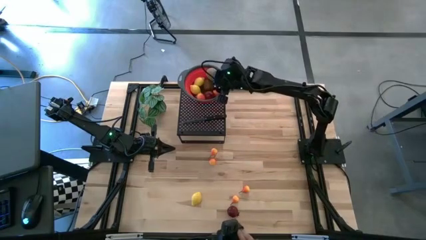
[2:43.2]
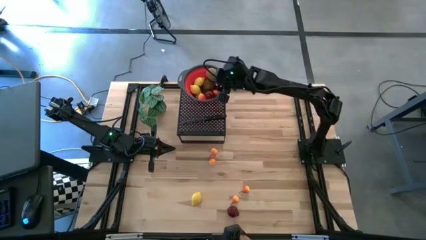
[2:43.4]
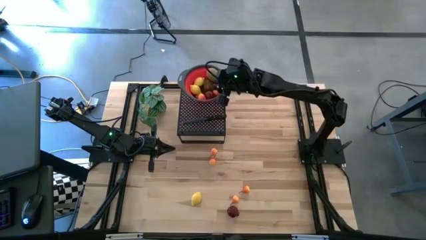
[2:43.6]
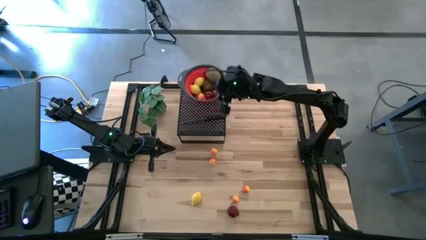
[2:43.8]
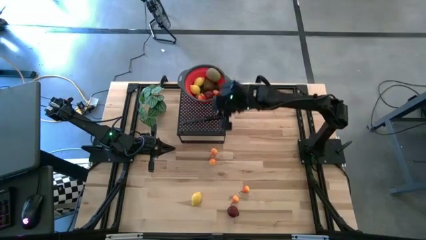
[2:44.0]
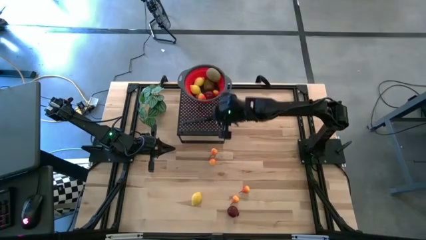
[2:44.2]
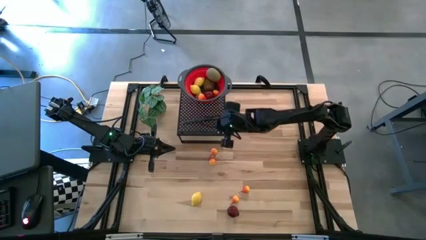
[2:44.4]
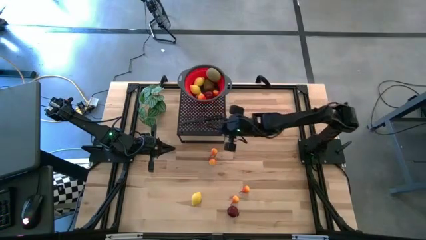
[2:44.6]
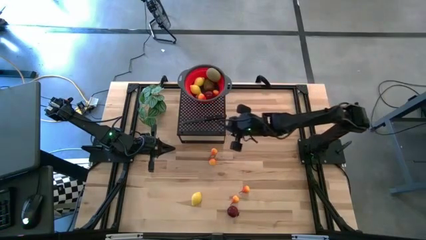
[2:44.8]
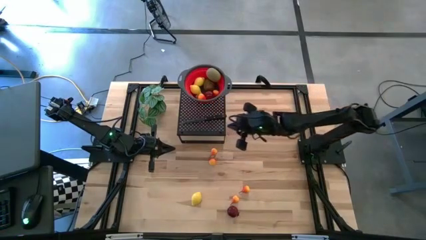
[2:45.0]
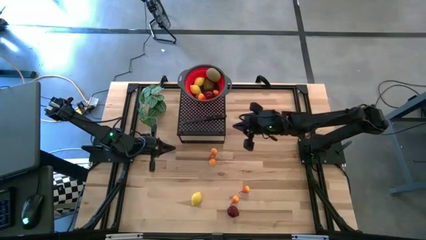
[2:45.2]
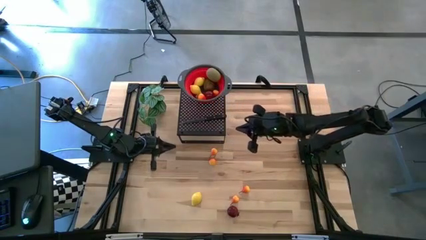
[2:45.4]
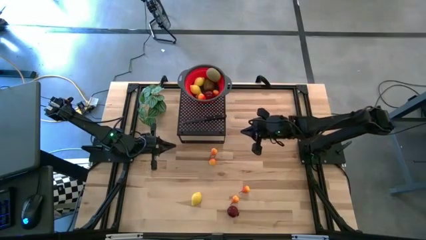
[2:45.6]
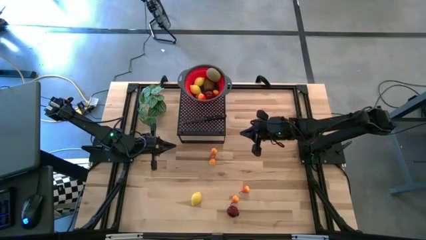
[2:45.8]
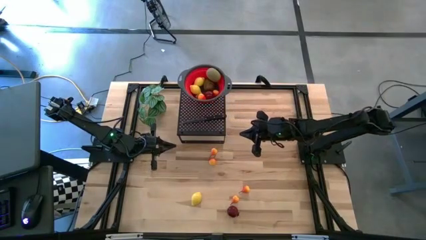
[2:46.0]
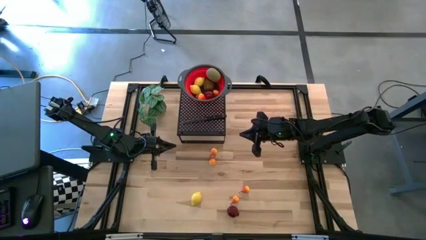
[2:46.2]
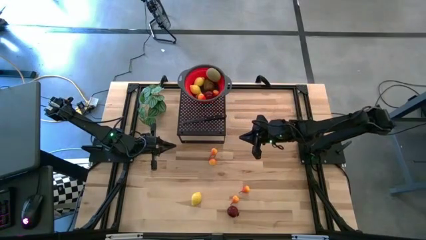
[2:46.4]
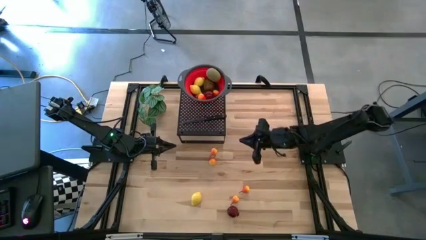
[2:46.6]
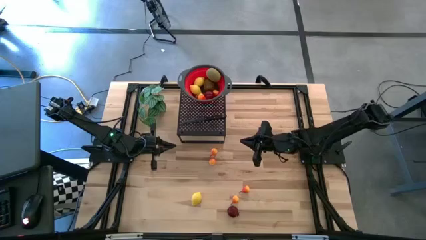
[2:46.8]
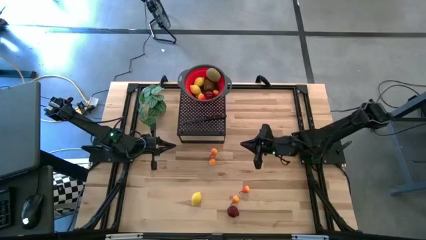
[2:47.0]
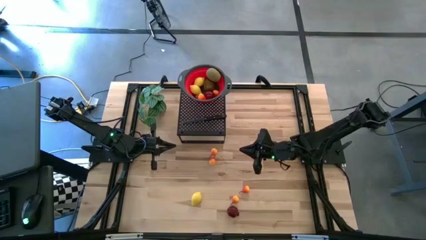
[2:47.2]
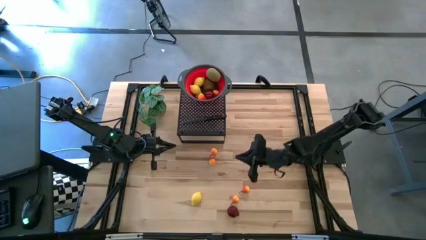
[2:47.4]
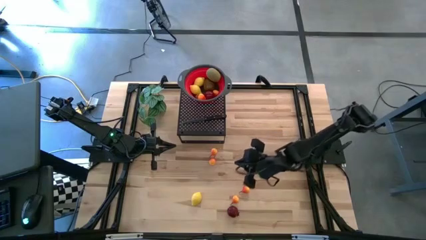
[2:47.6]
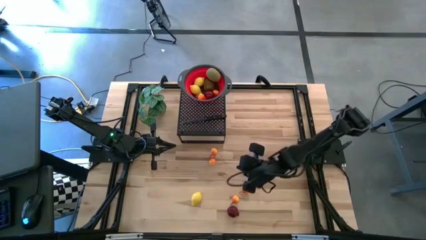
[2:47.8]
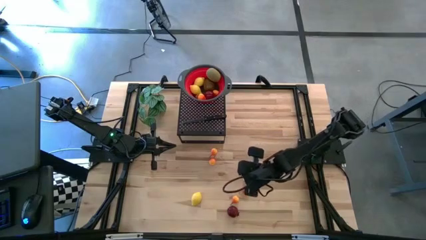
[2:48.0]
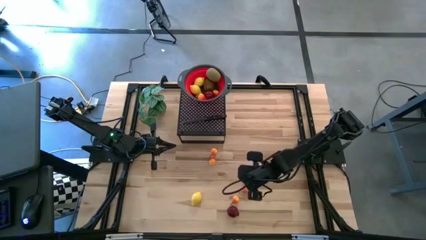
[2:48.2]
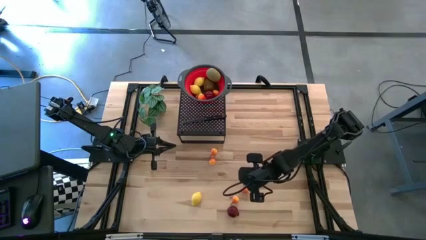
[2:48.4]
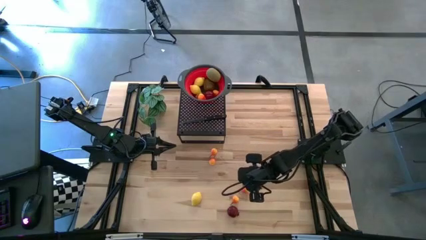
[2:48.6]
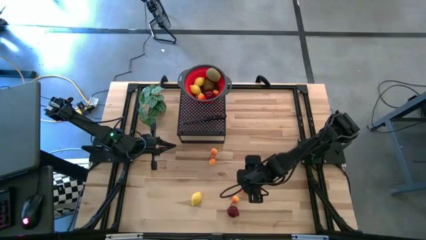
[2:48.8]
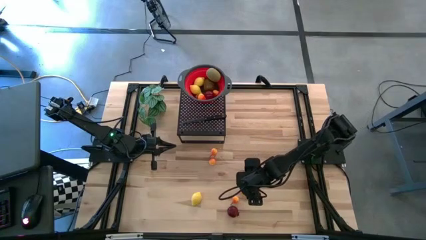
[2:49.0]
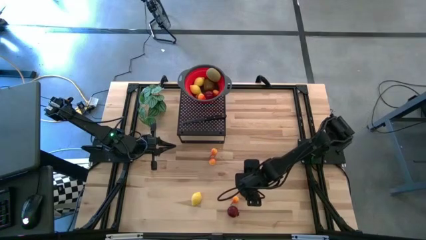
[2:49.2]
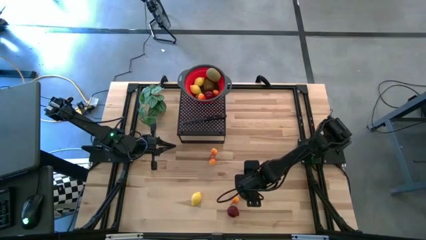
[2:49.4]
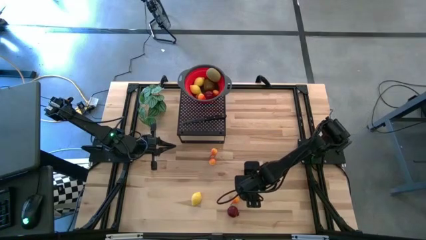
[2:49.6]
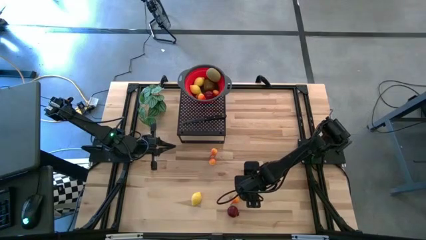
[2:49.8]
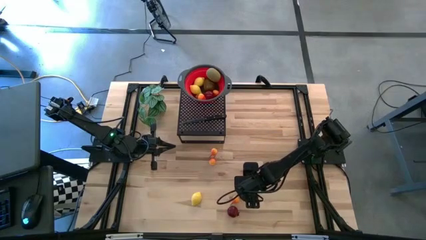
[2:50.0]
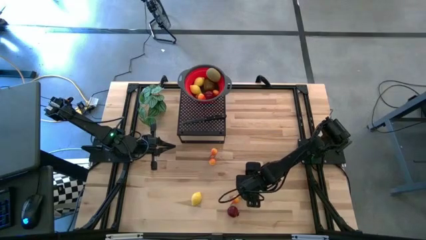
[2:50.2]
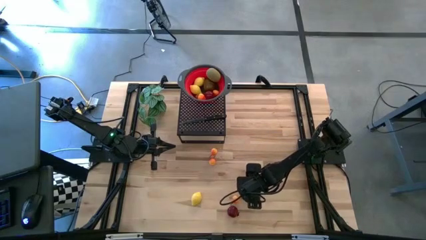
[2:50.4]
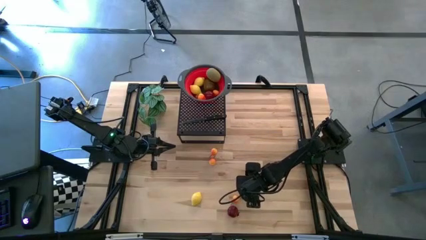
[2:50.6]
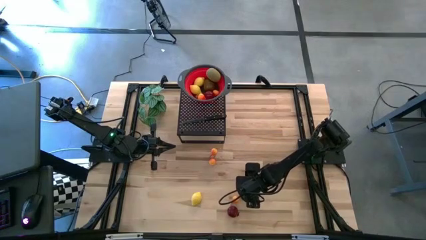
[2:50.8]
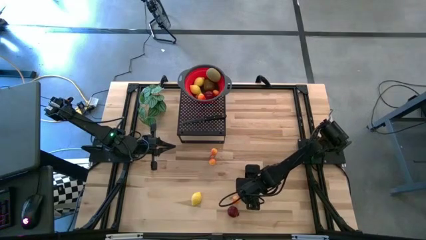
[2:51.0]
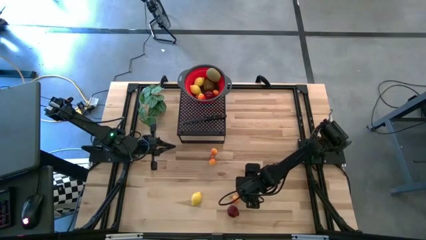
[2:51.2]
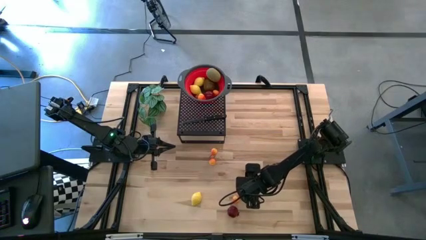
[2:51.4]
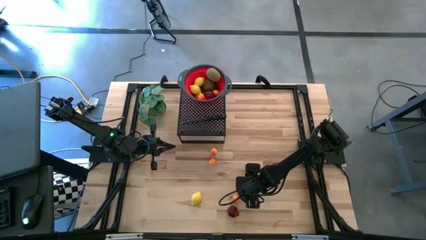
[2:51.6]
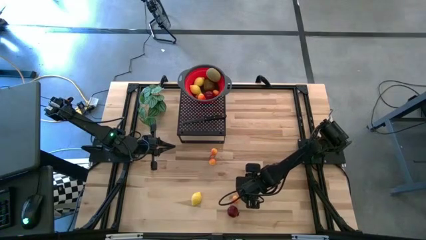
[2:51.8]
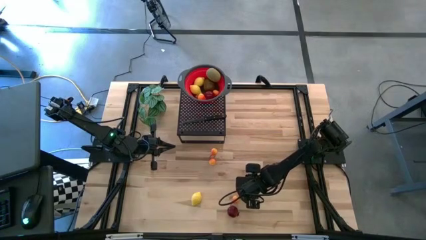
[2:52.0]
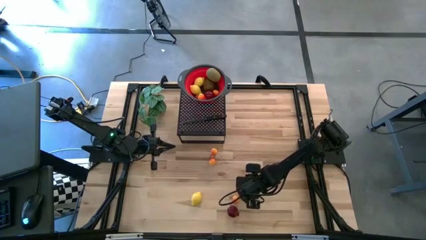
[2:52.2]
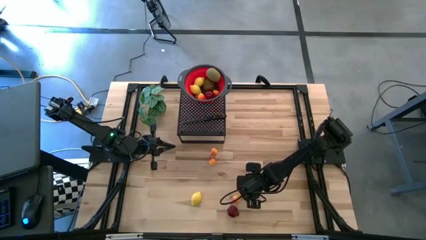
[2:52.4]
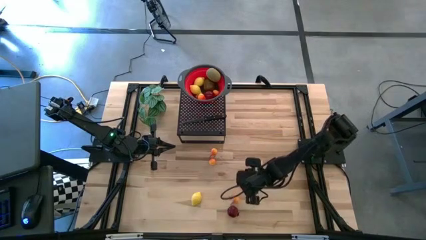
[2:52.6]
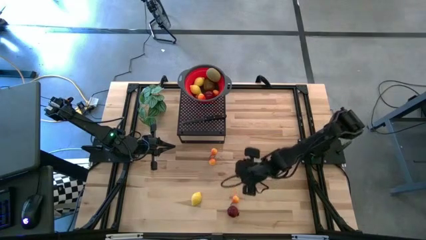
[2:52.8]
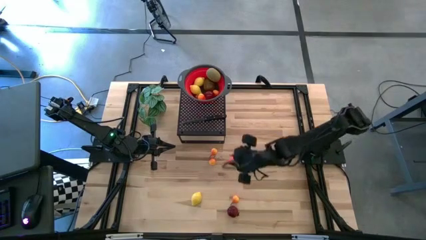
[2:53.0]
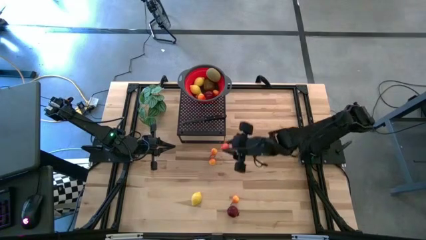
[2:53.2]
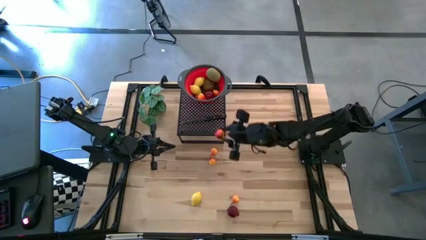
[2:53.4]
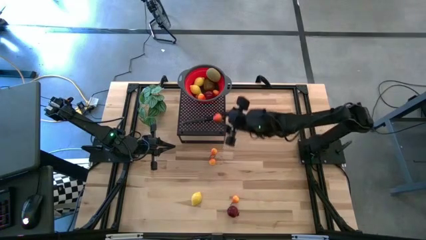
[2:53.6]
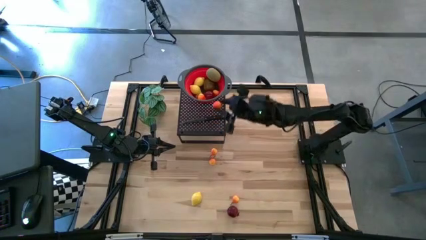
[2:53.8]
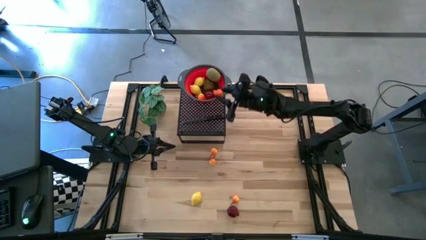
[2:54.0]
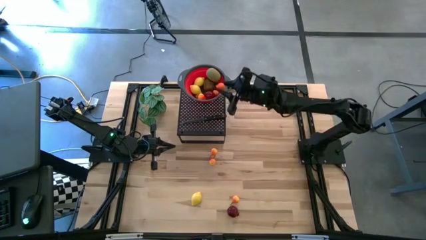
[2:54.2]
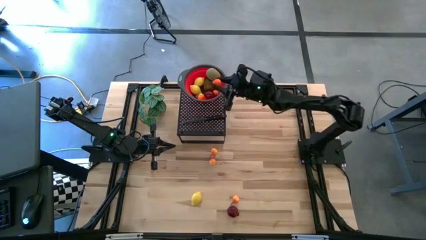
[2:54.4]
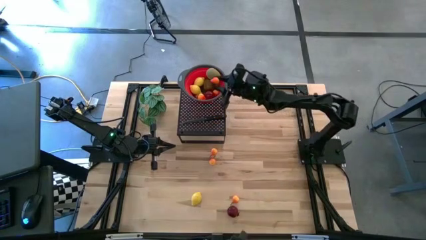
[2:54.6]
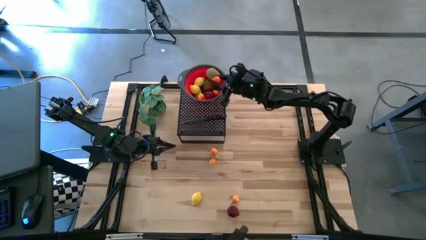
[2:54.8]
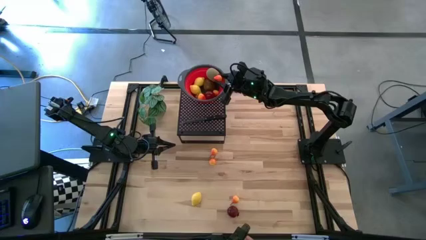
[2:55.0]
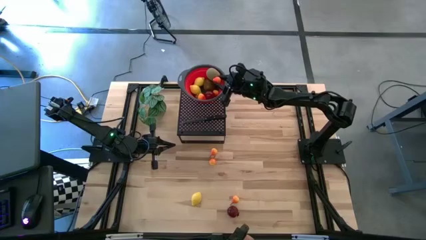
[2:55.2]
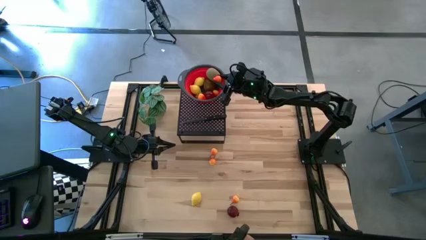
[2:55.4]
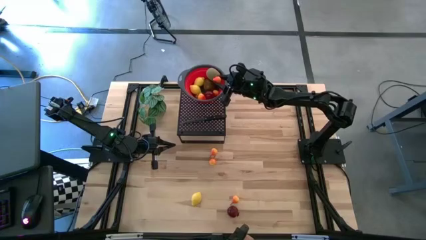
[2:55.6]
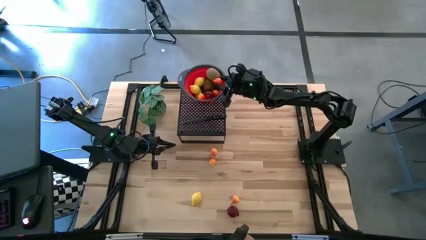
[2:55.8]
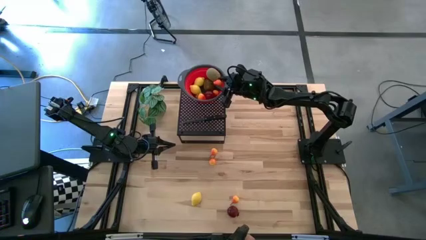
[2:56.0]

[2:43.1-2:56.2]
Task: Pick & Place Fruit
Put the pear into the red strainer bowl

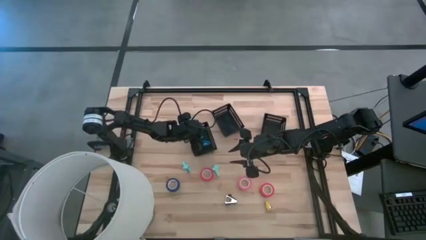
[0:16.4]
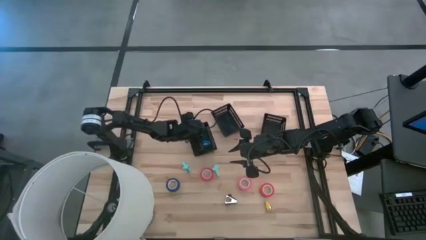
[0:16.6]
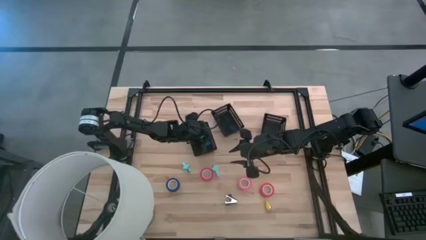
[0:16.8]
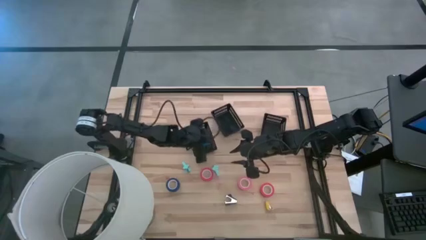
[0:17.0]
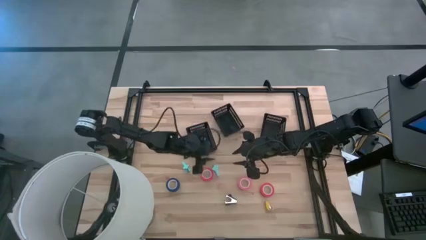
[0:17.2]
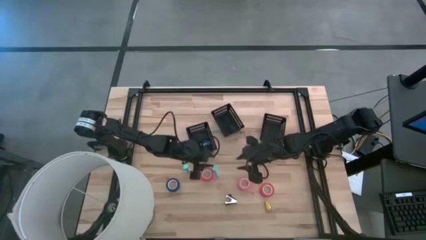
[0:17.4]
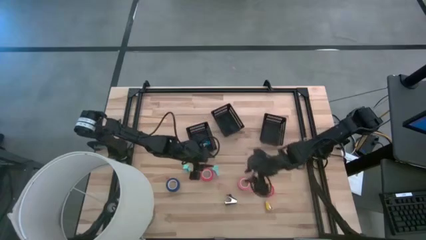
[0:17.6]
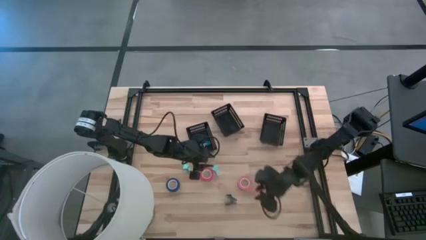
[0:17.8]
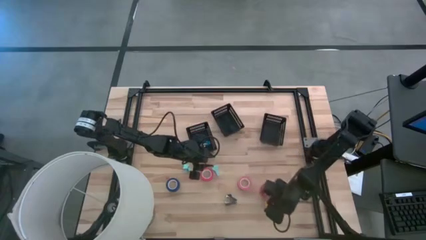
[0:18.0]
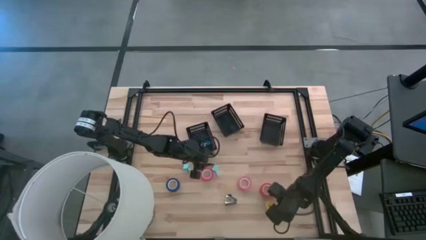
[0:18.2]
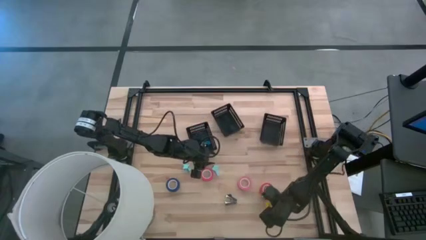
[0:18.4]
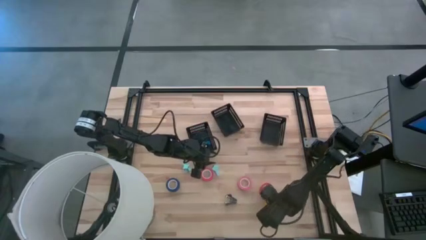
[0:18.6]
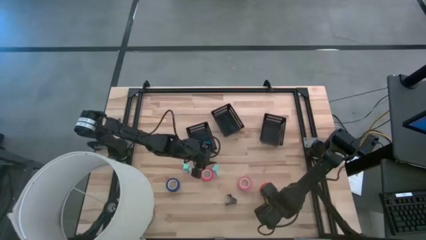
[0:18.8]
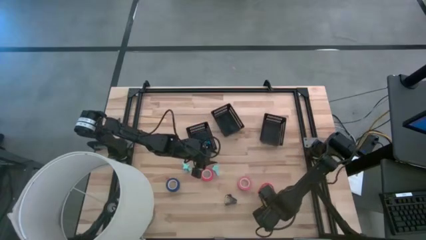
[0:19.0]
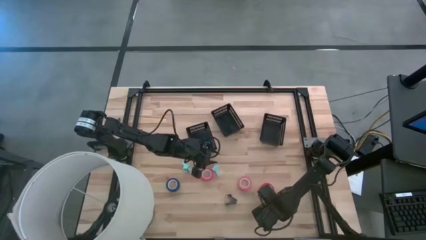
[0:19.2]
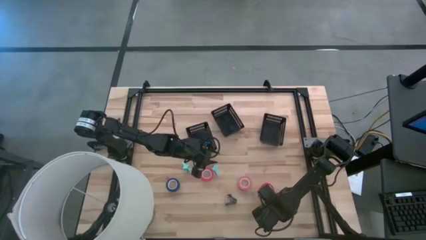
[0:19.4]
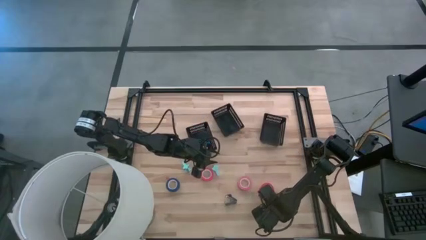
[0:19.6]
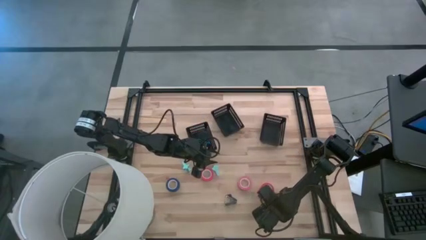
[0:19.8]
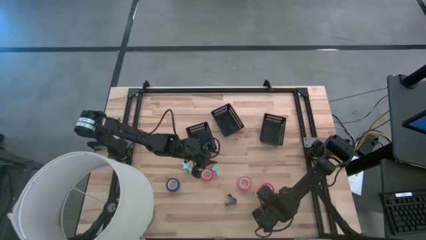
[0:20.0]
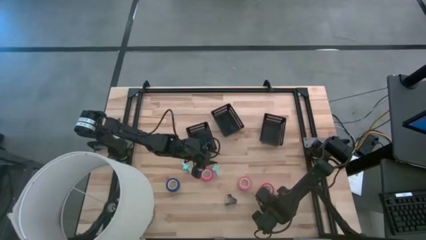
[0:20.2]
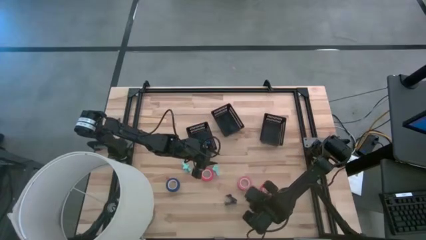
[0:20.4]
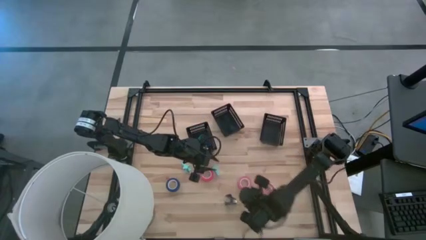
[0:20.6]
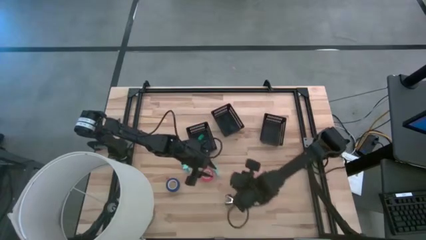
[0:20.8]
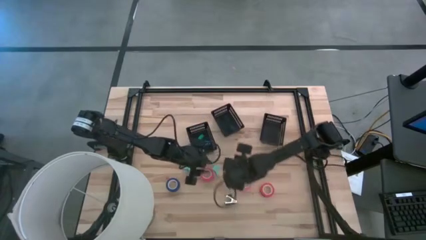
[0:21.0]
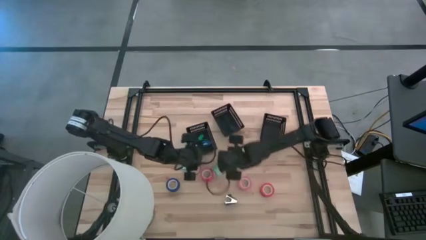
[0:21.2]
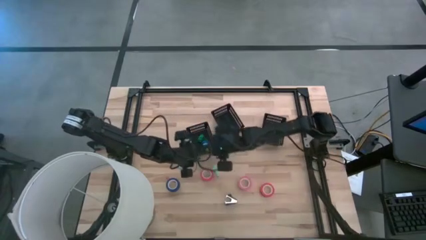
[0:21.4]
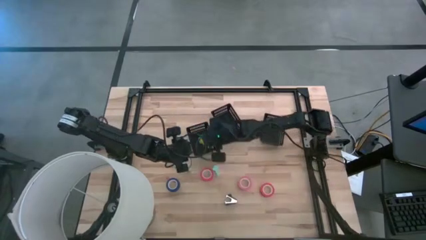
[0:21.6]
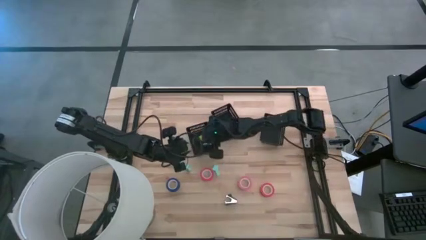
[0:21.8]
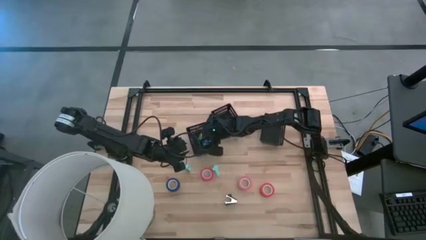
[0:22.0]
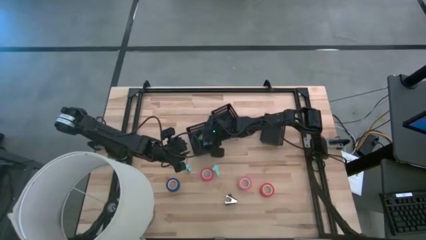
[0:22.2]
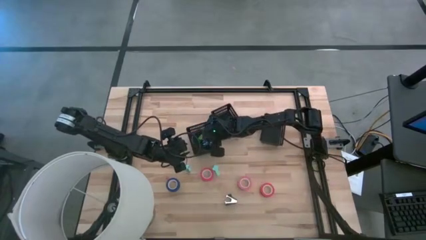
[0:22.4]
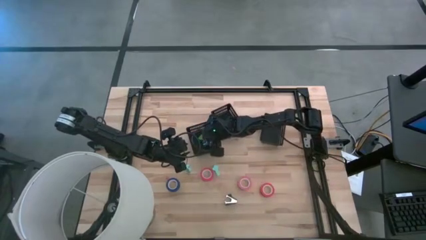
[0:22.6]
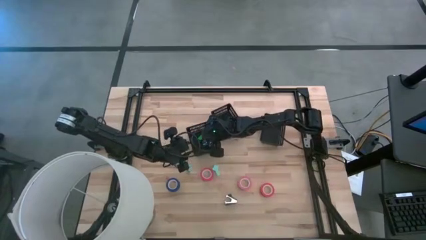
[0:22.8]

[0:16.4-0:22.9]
Task: Pick and place Stapler, Stapler remover, tape
Put the yellow stapler into the left black basket
